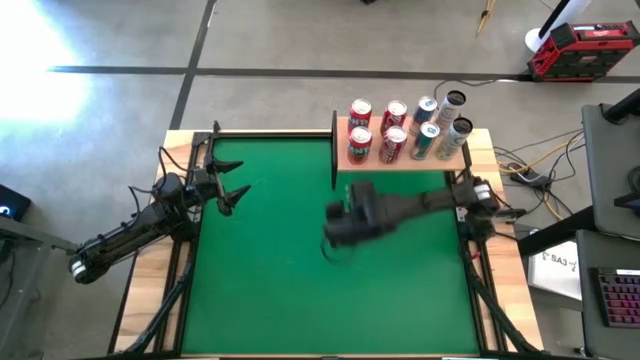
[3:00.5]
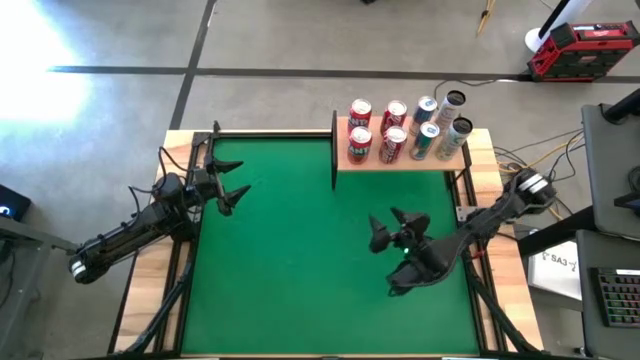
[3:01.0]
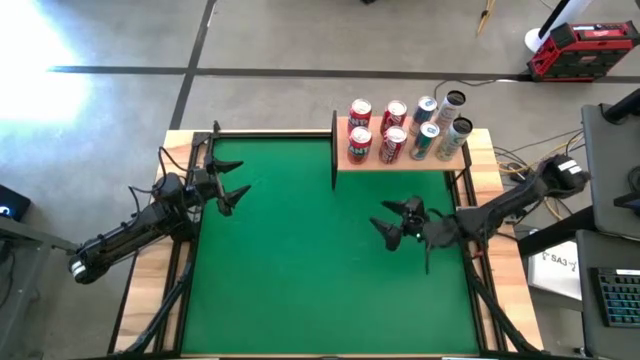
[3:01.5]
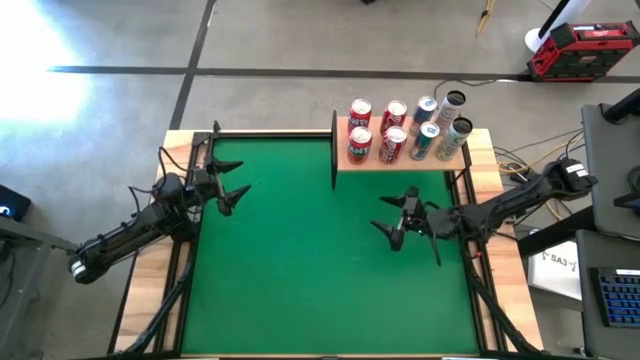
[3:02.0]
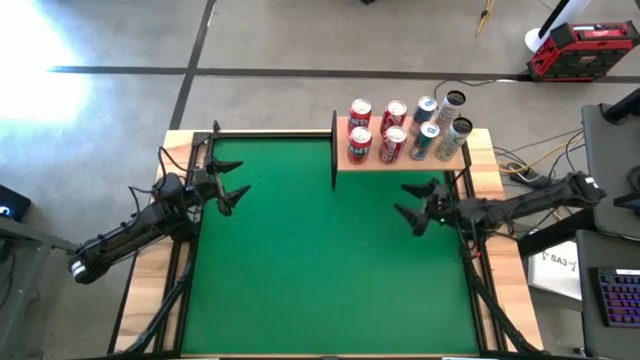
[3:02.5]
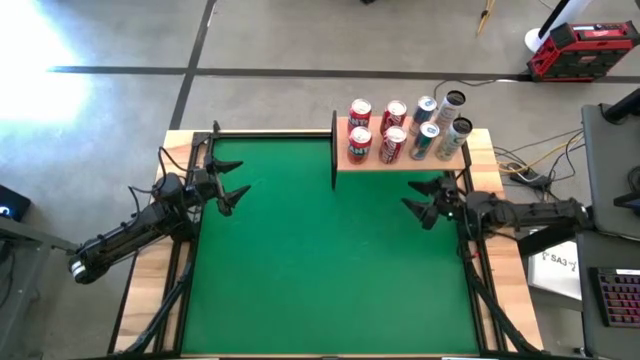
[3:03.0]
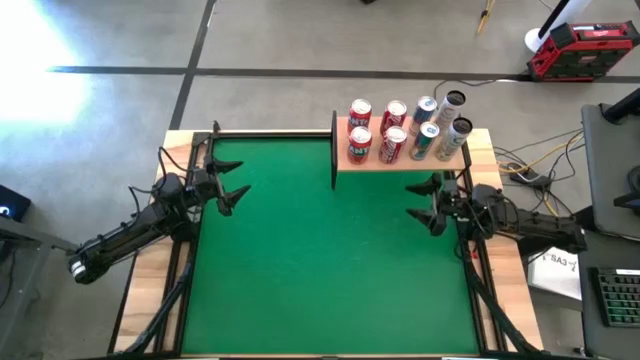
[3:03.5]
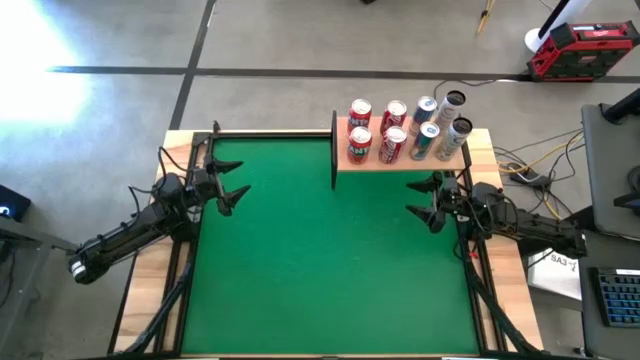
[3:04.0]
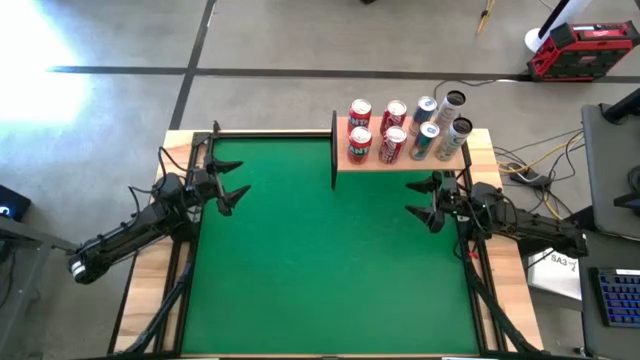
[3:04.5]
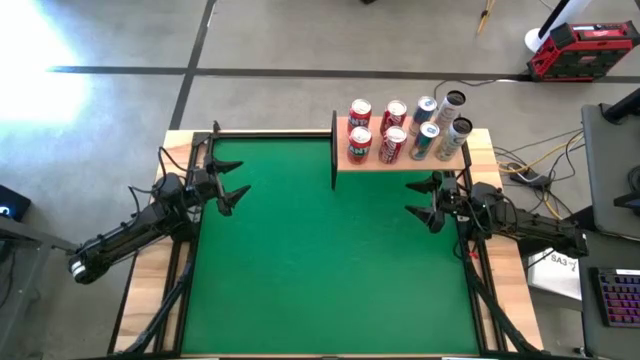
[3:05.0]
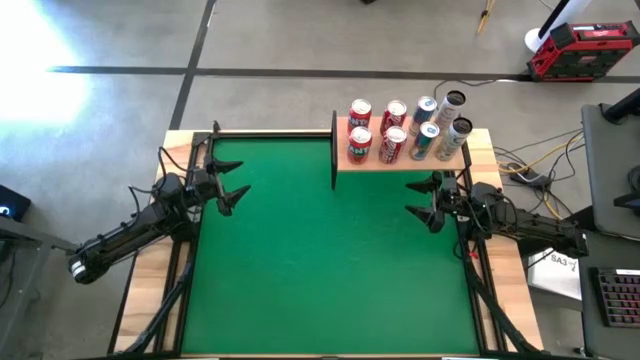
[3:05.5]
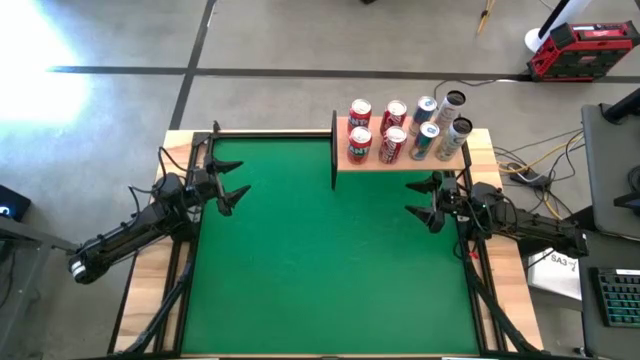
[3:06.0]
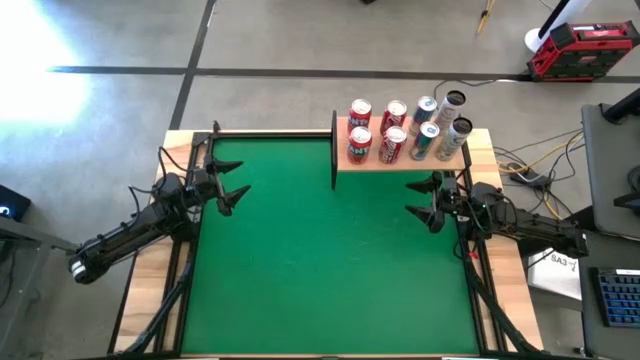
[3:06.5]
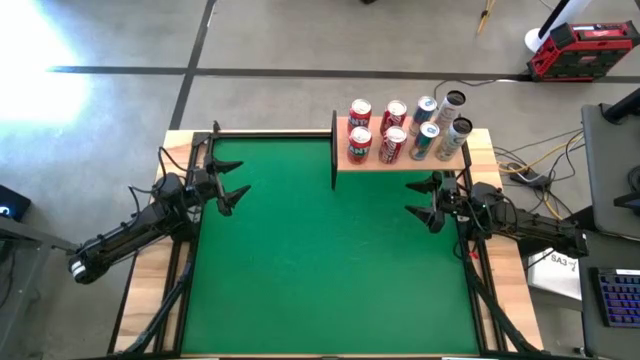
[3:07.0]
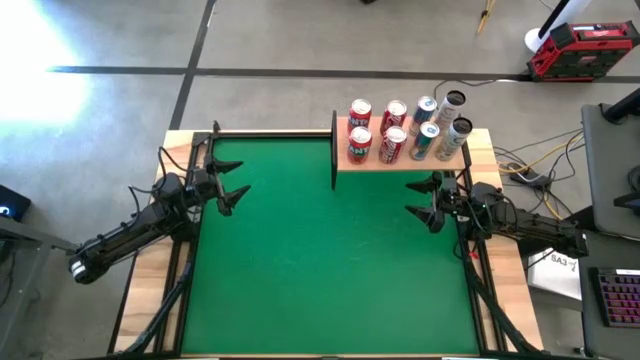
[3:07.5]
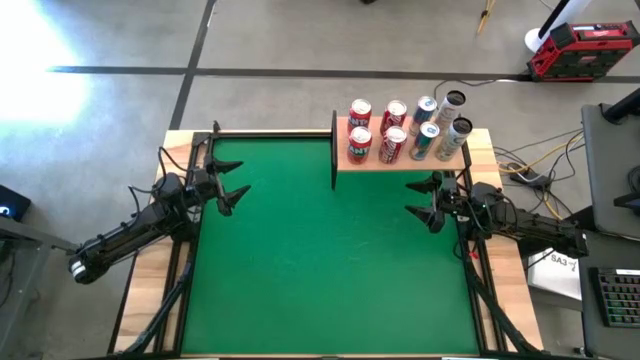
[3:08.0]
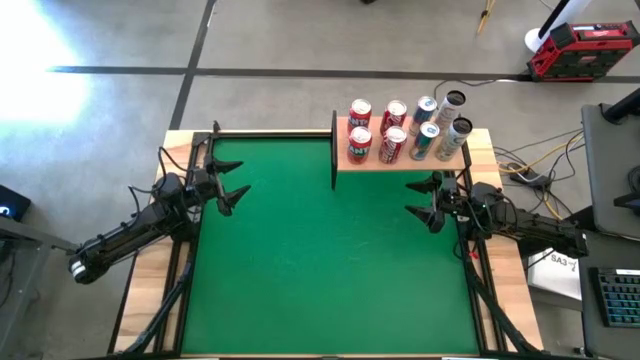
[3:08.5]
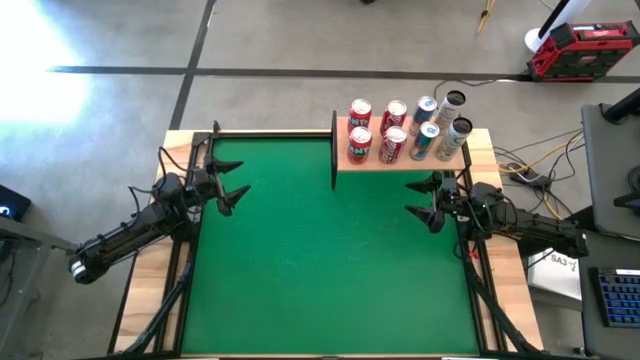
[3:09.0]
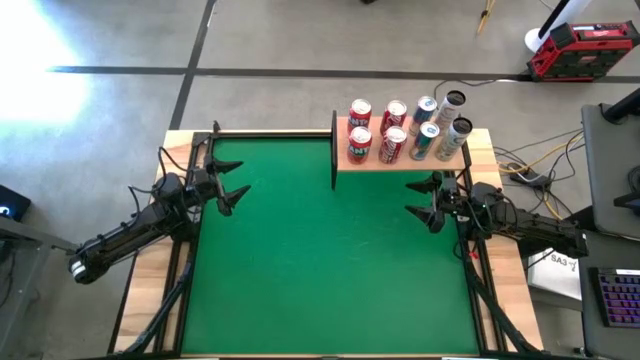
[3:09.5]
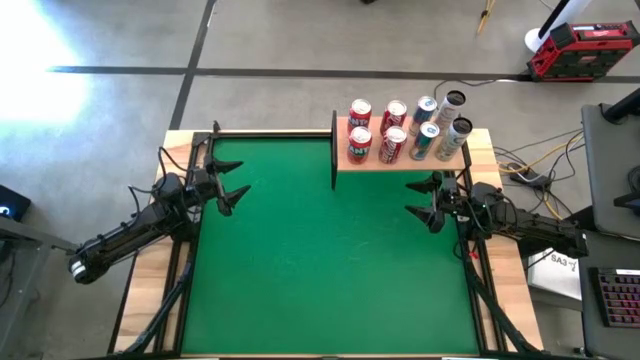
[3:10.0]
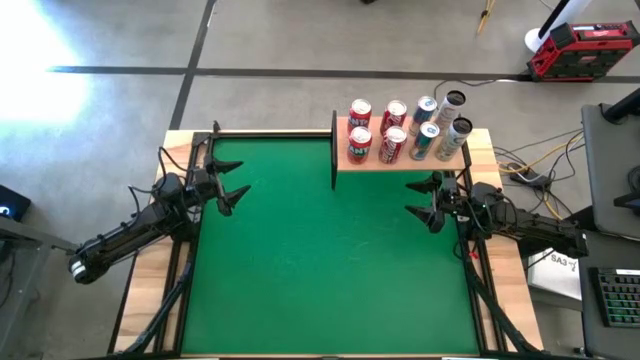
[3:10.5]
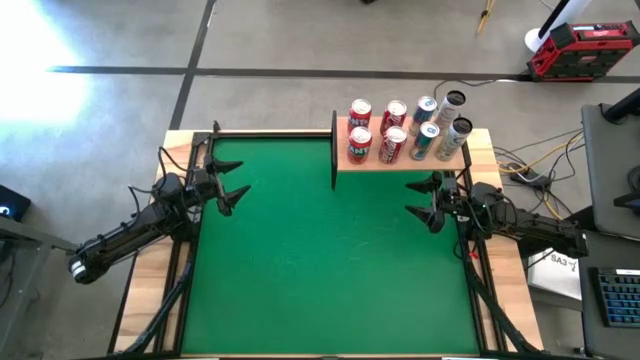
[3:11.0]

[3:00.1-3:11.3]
Task: Place canned beverage on shelf
Return to Home Position

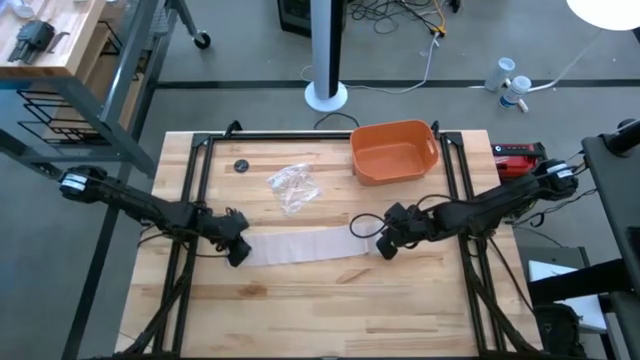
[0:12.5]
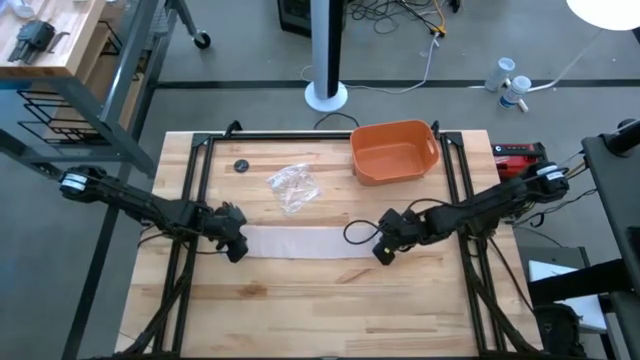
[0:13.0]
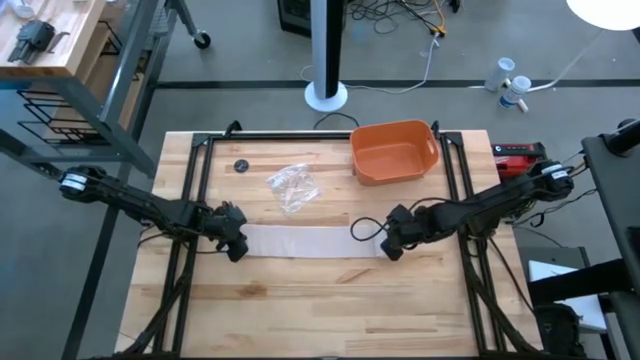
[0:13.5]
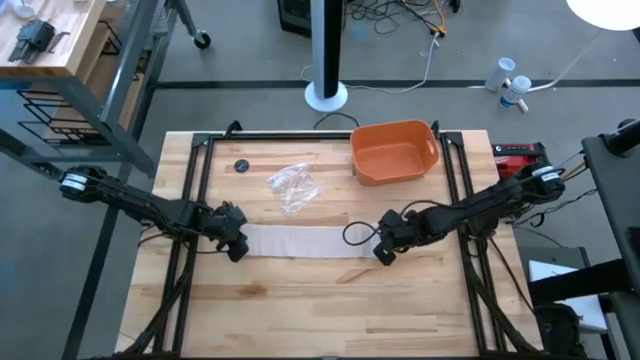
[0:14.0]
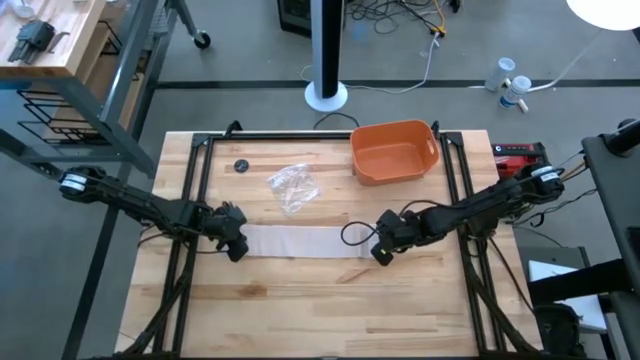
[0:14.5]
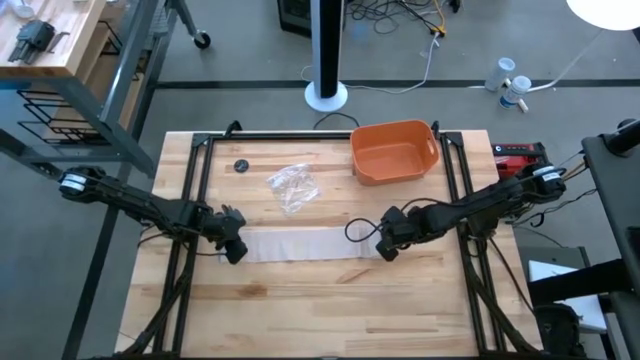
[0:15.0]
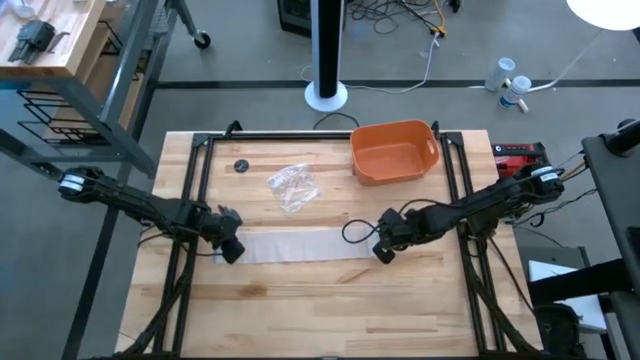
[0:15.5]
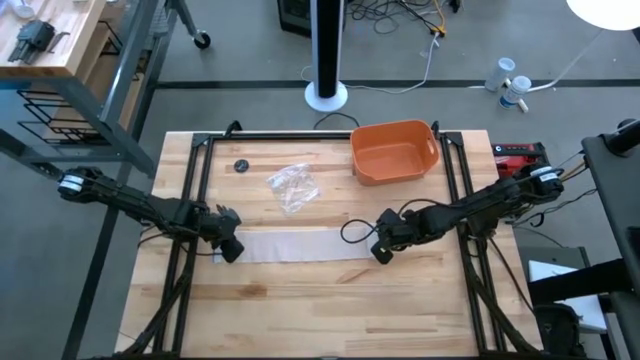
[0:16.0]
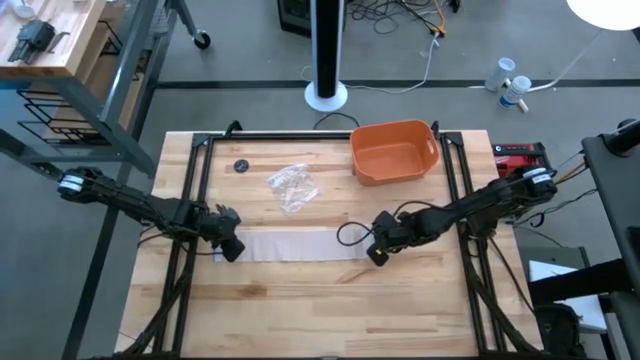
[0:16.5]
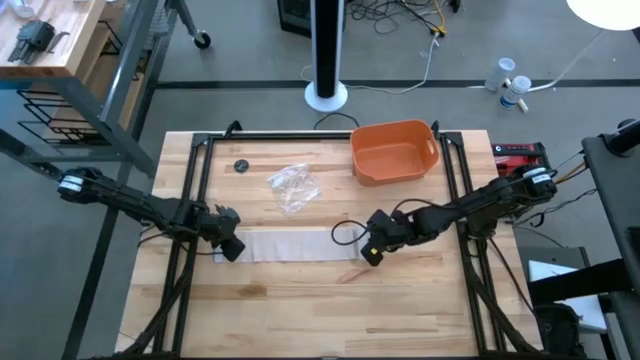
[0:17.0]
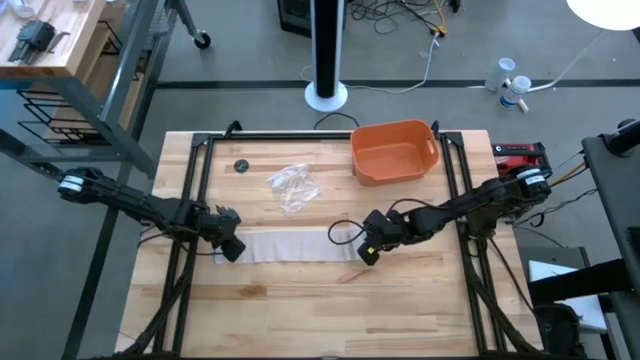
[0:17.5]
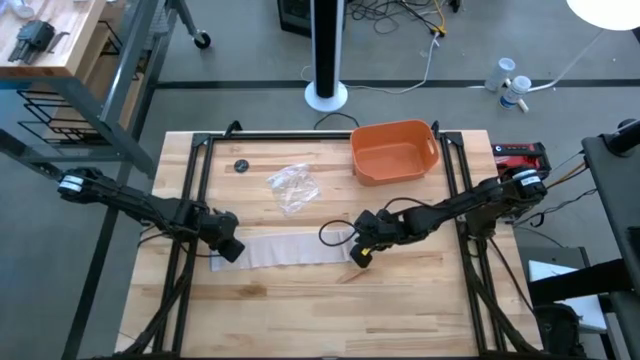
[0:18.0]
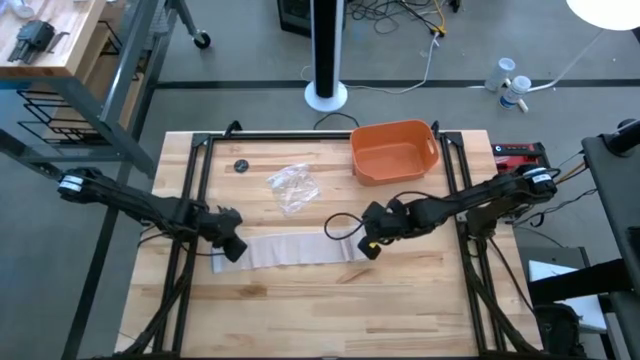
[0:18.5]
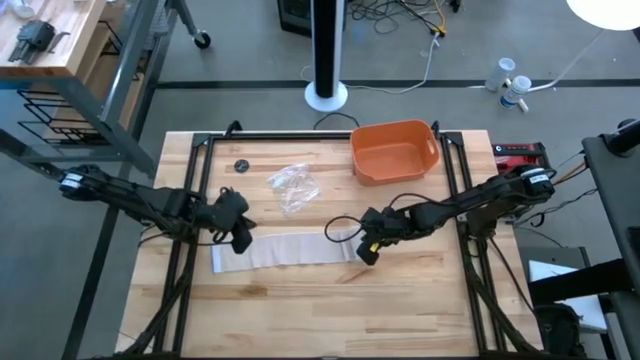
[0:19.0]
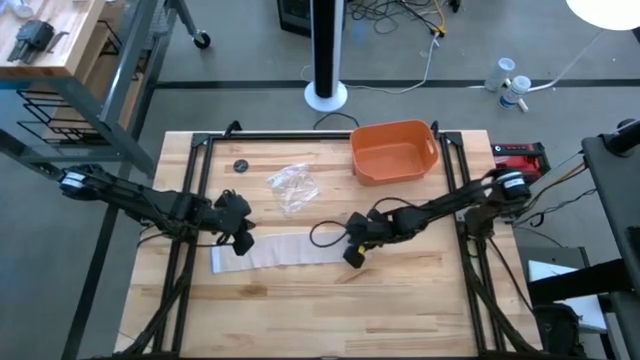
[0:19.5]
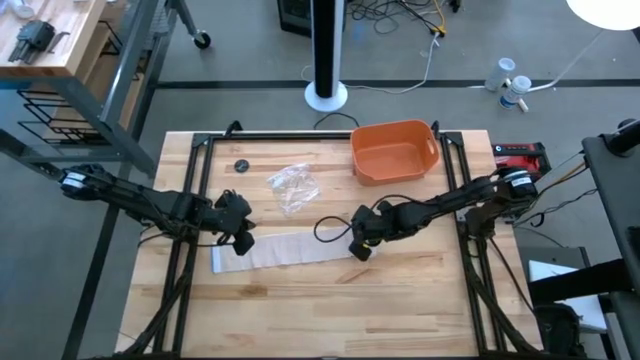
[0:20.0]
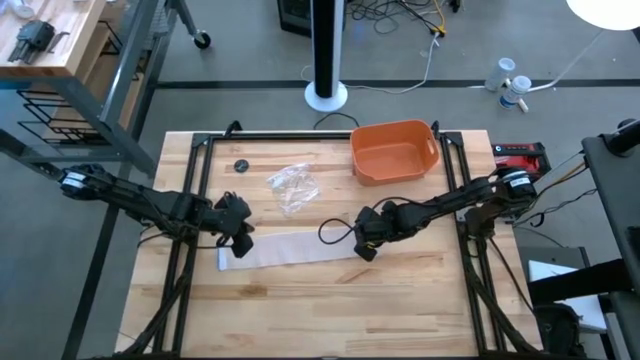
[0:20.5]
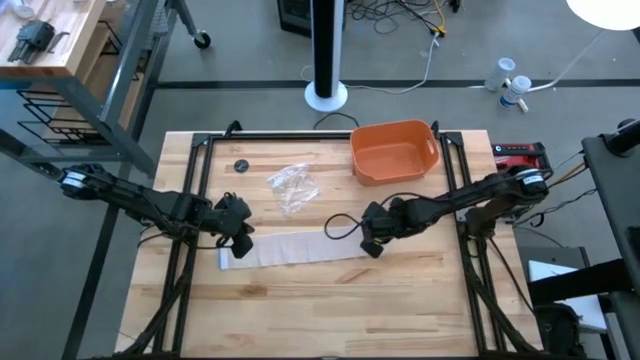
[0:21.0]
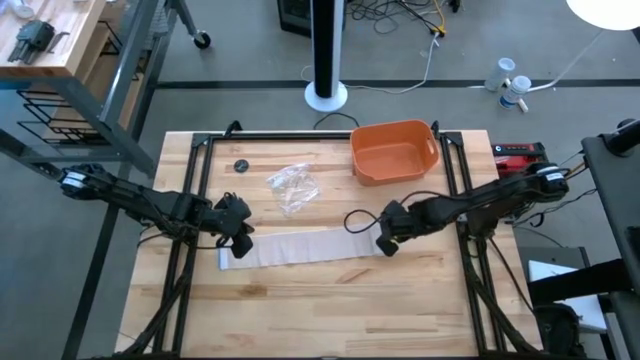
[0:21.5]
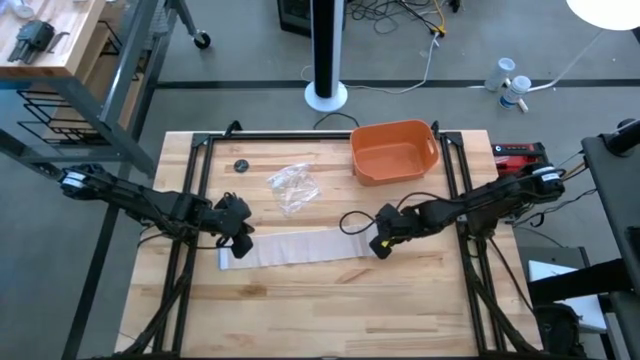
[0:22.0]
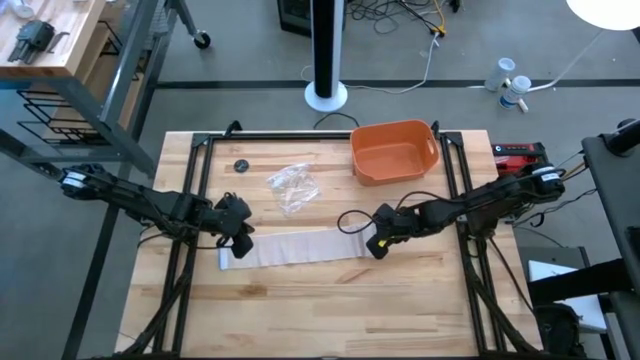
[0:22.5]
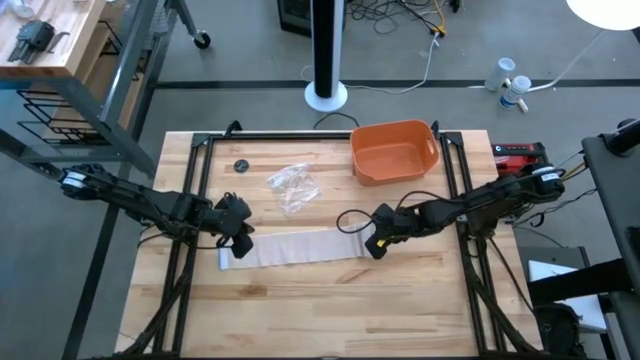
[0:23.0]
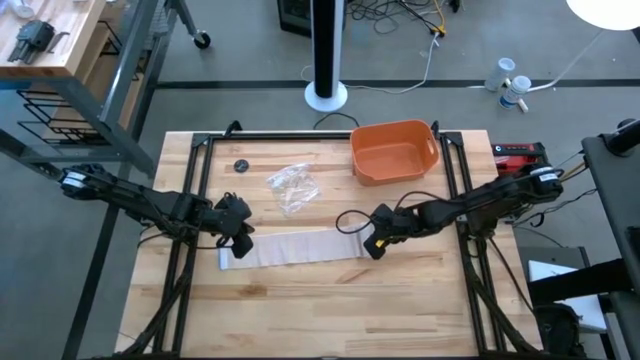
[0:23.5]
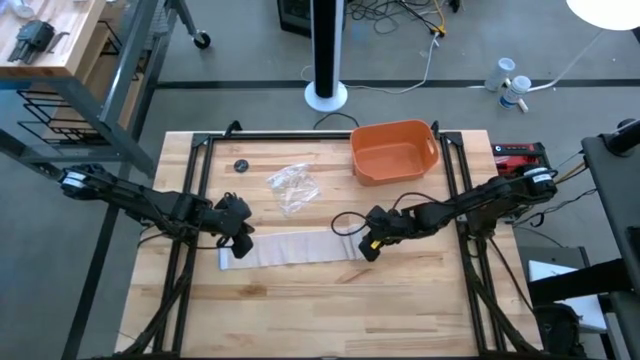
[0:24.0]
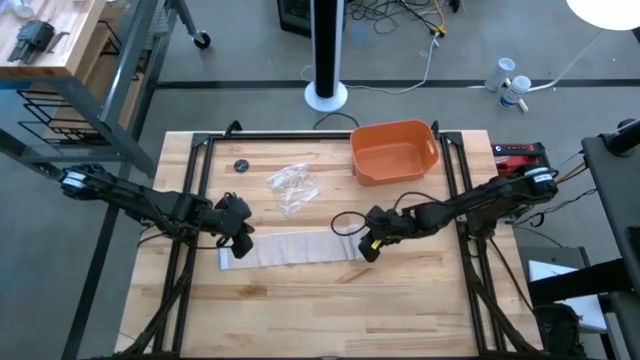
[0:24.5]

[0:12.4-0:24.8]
Task: Roll bandage
Roll the brown bandage
